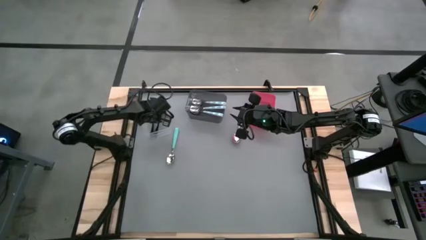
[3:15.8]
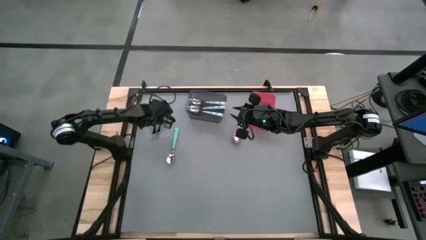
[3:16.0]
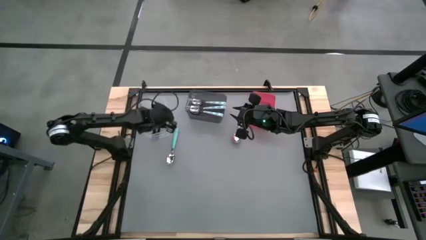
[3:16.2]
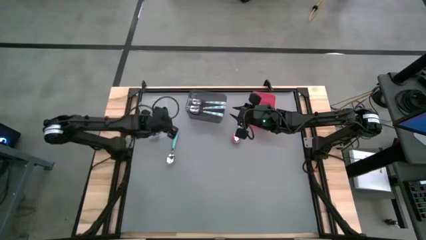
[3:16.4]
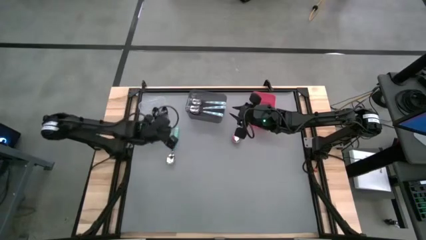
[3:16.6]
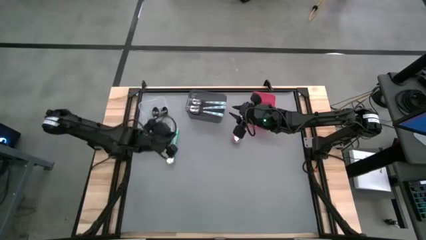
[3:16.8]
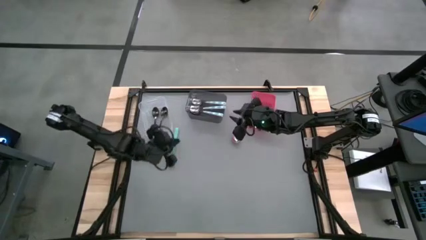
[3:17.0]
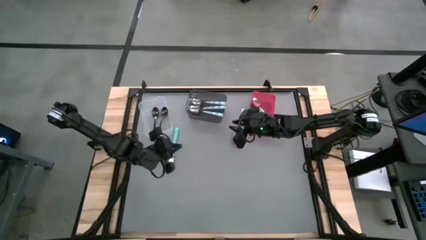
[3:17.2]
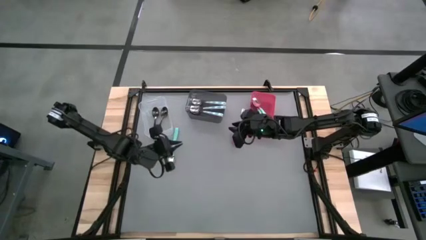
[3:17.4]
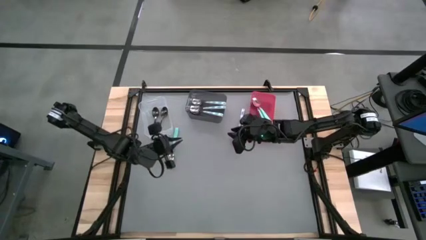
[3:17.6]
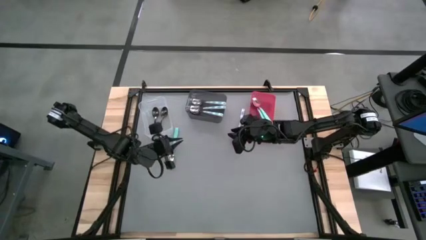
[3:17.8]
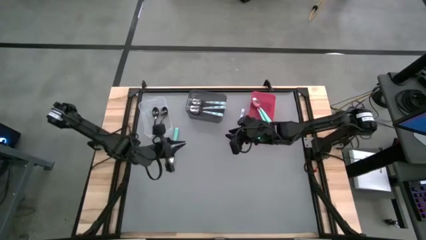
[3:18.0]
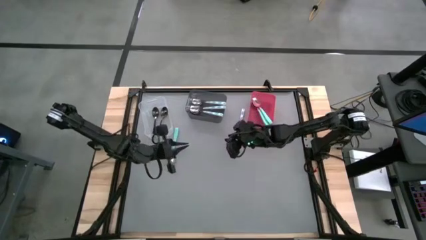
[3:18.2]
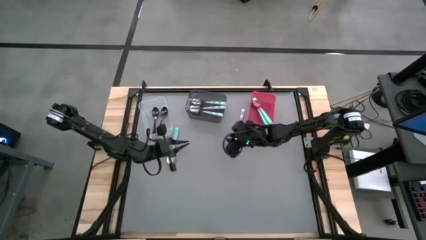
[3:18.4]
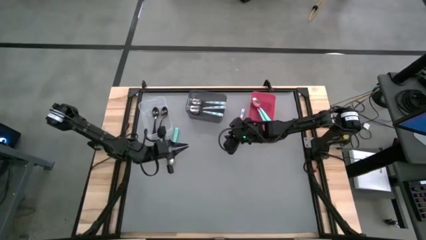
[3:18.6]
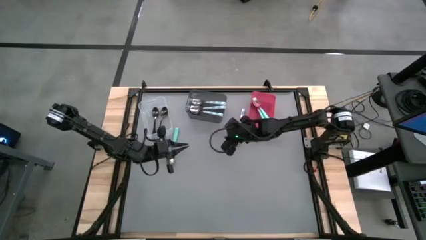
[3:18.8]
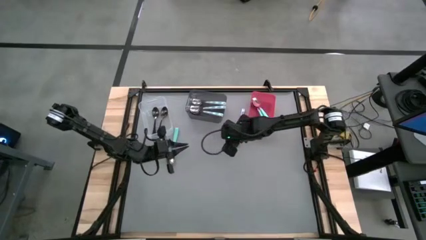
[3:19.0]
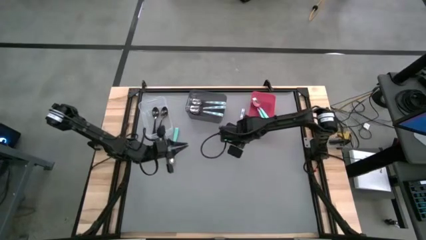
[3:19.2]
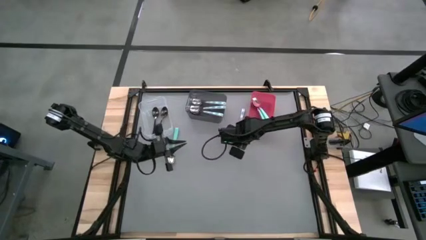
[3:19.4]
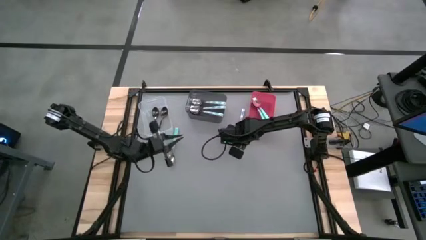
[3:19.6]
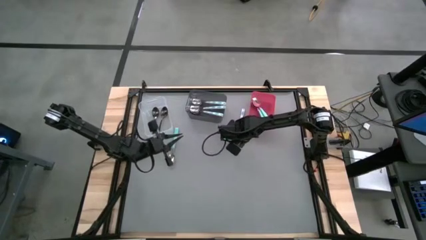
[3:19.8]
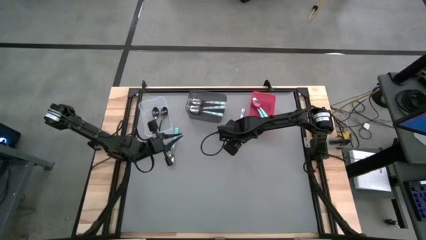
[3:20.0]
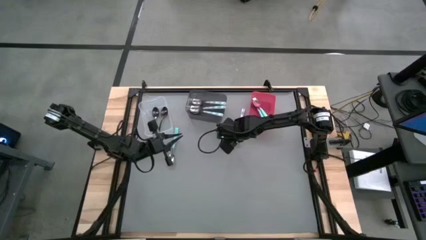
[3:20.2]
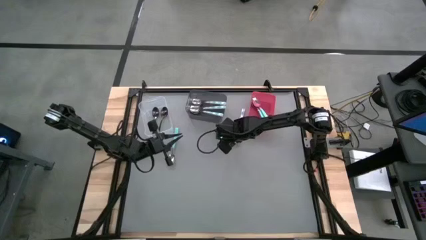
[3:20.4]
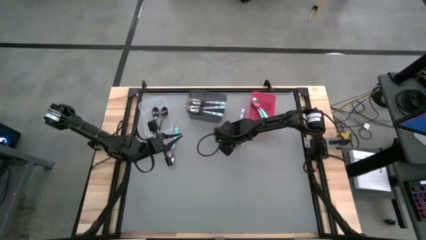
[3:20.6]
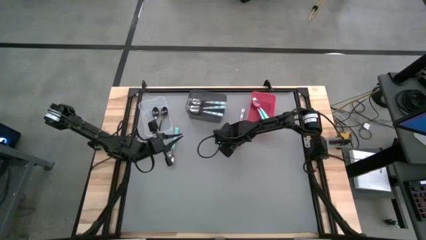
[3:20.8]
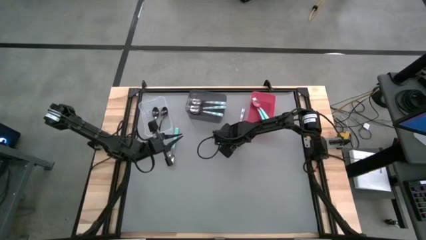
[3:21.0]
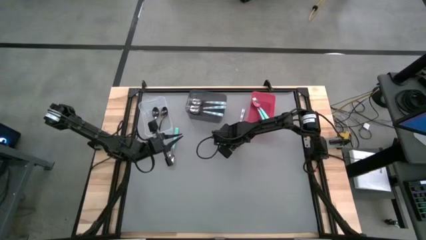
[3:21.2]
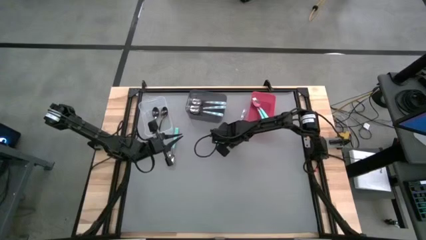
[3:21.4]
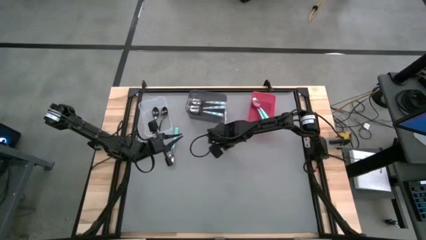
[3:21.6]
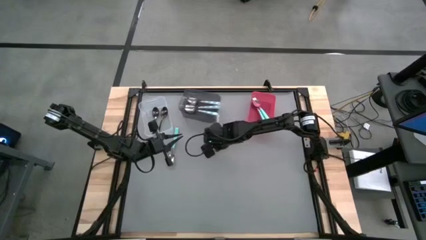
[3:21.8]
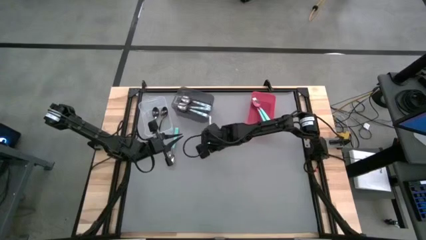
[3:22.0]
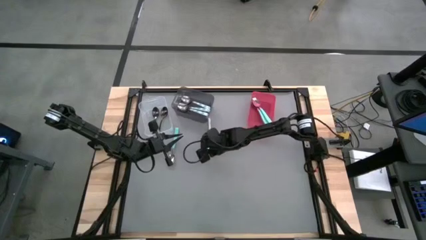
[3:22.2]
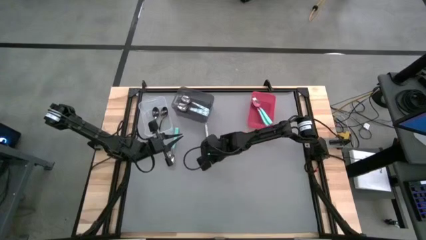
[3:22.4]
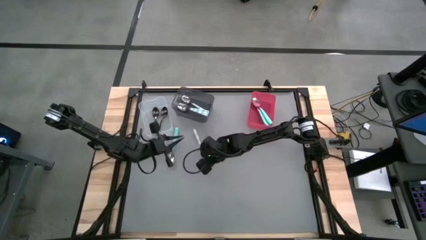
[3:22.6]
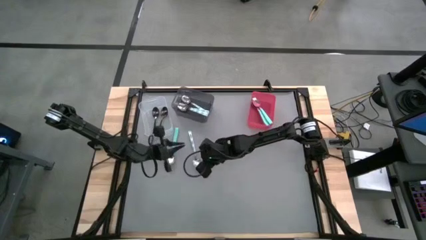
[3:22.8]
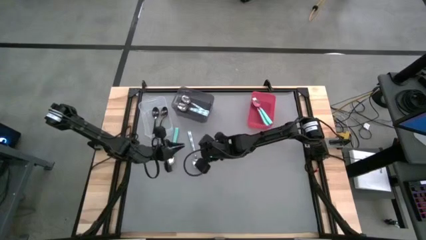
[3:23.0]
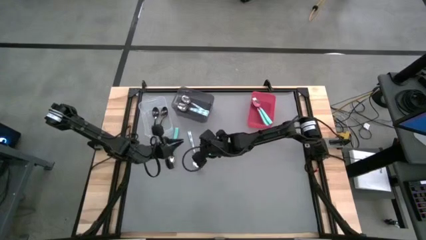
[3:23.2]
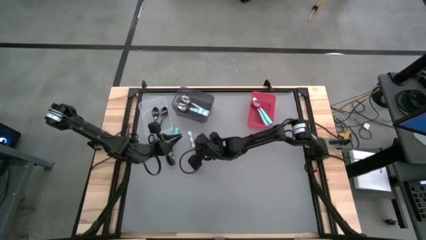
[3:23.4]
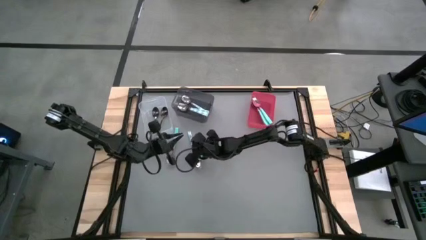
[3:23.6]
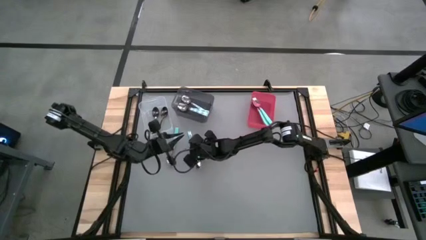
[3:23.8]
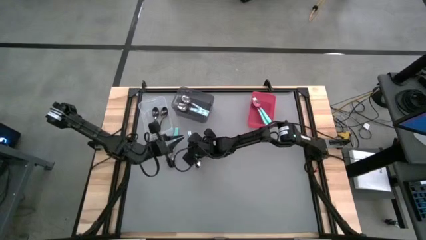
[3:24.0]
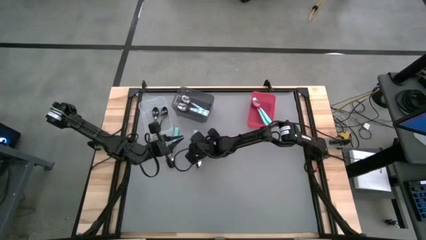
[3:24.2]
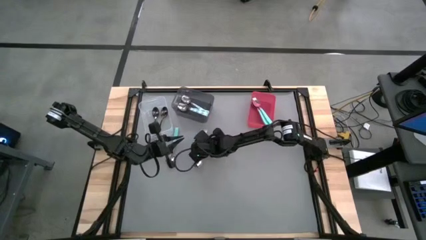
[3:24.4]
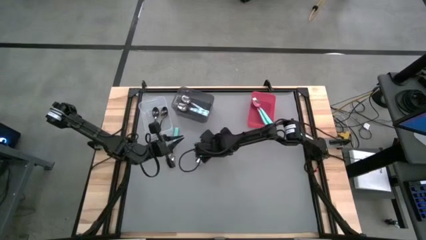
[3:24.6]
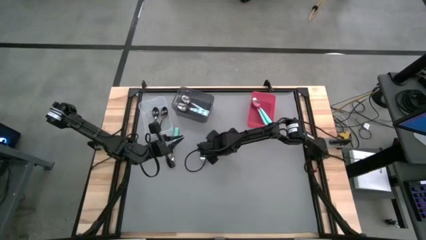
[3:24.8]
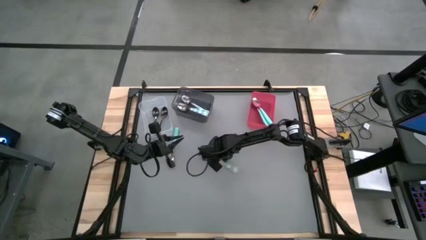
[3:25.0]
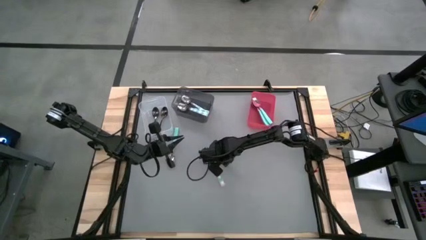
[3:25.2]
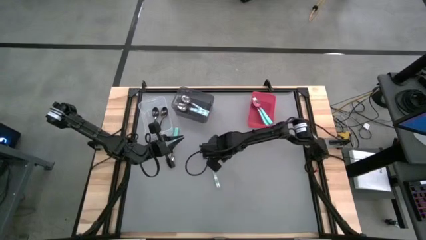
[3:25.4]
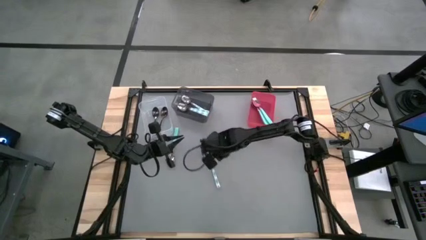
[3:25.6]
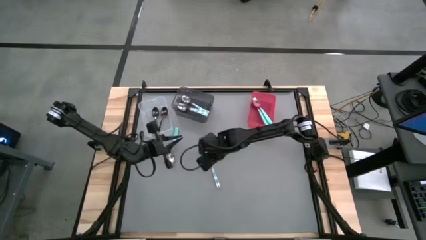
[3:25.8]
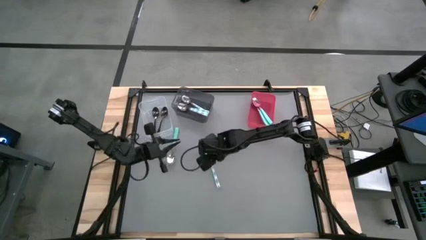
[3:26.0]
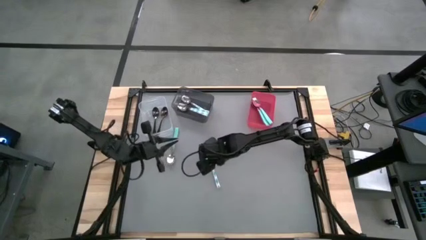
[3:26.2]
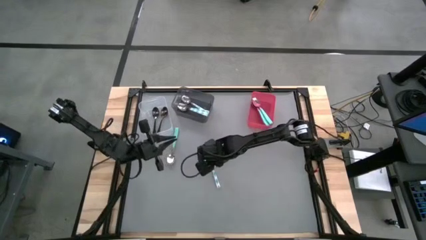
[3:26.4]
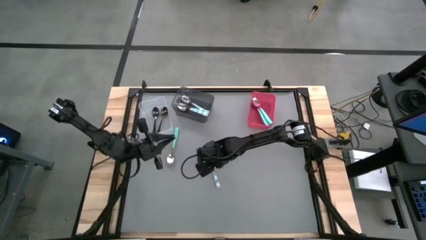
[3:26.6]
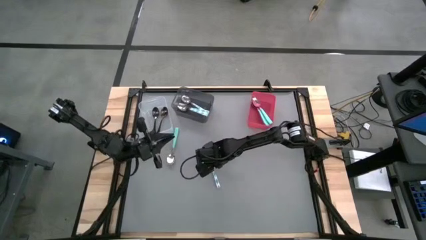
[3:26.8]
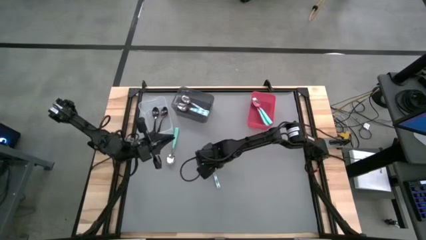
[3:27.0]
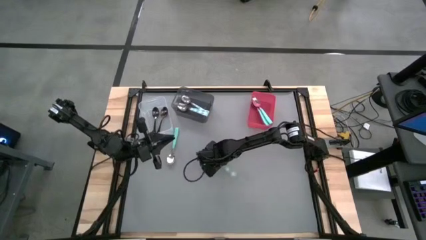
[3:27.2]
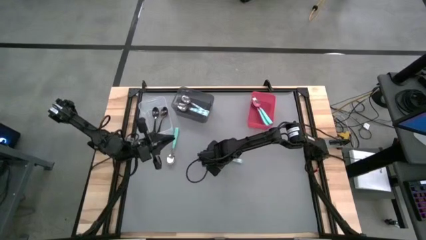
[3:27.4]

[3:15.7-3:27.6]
Task: Sort silverware by color (type)
Put the blue patterned spoon into the black bin

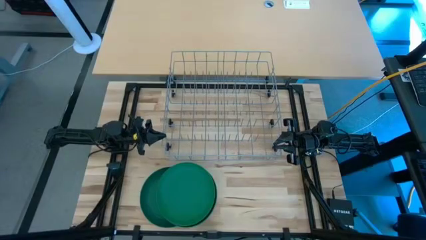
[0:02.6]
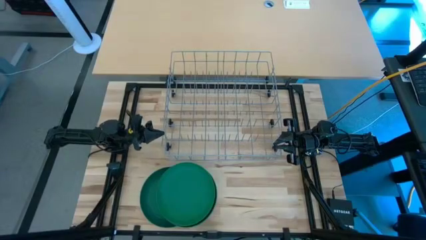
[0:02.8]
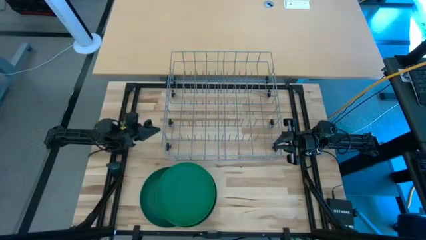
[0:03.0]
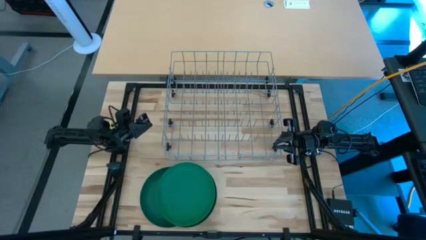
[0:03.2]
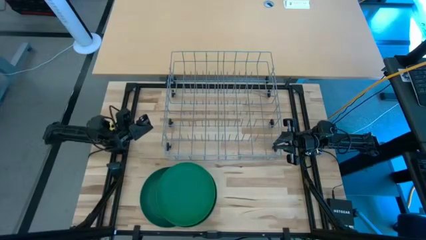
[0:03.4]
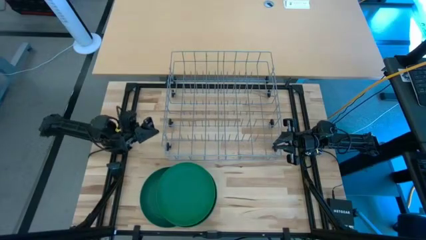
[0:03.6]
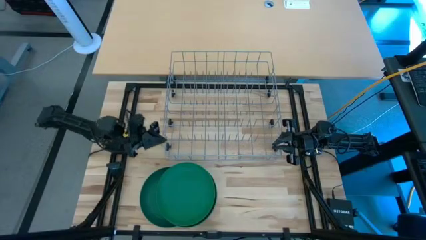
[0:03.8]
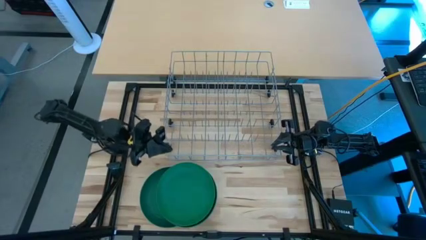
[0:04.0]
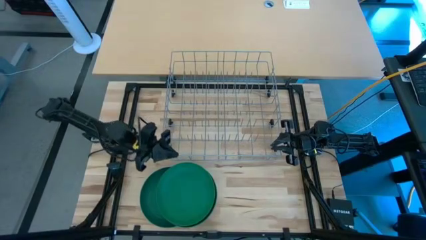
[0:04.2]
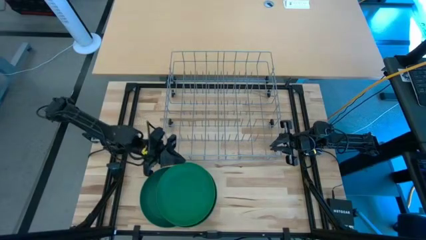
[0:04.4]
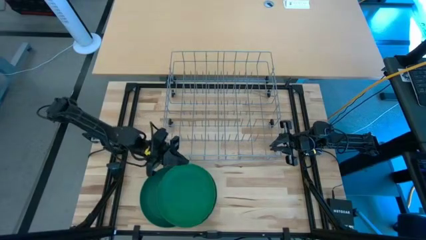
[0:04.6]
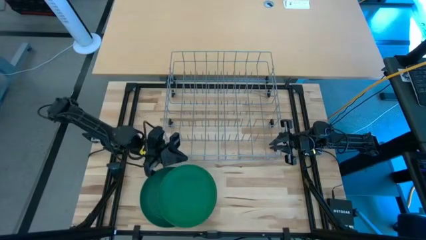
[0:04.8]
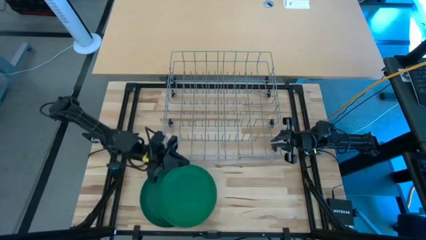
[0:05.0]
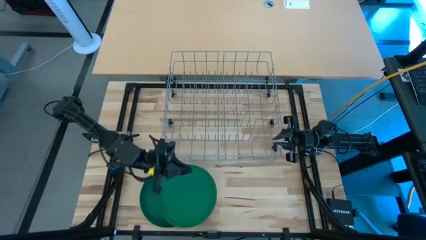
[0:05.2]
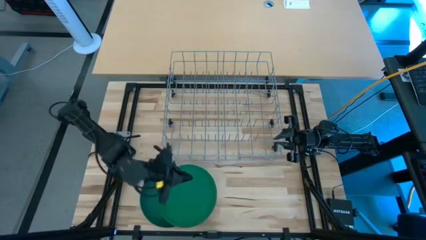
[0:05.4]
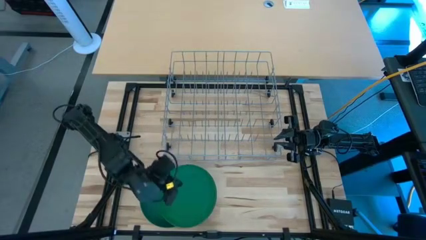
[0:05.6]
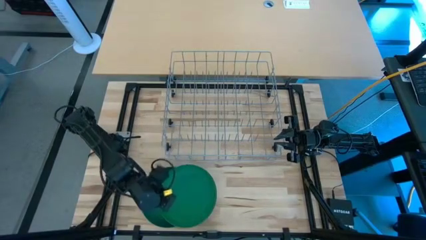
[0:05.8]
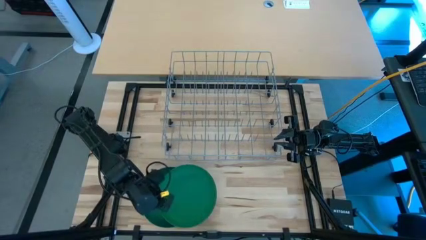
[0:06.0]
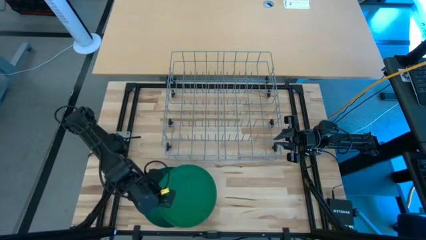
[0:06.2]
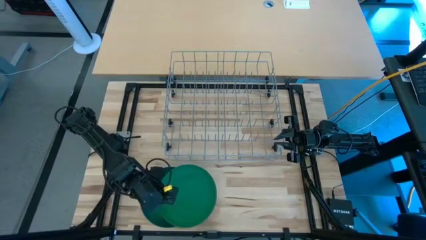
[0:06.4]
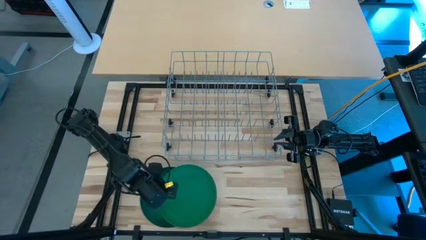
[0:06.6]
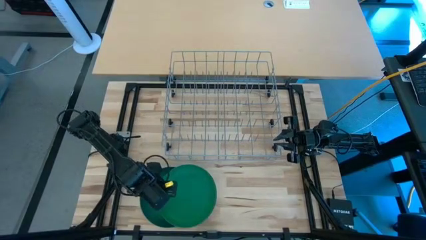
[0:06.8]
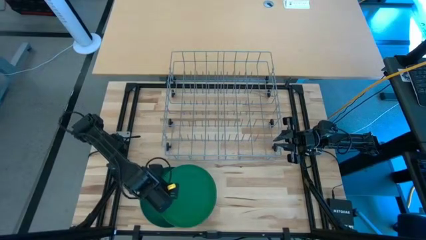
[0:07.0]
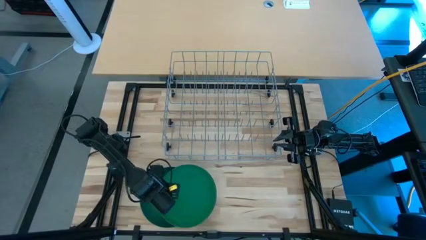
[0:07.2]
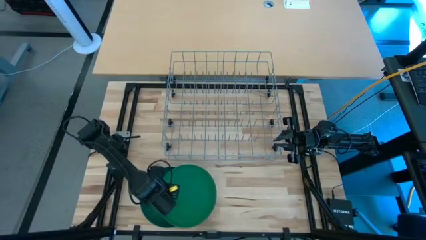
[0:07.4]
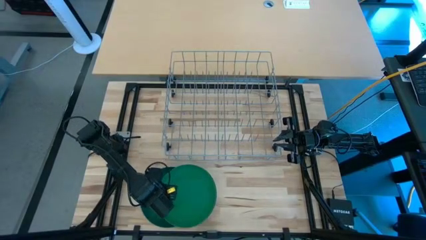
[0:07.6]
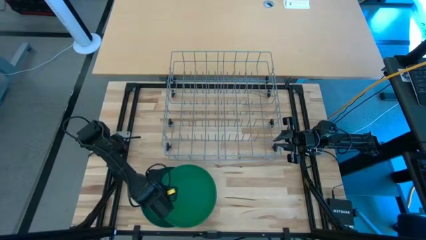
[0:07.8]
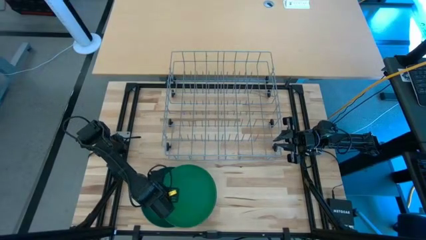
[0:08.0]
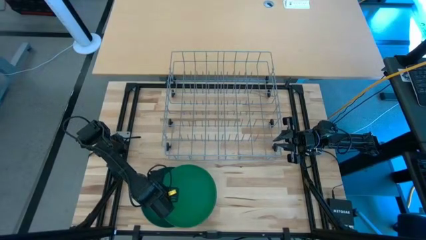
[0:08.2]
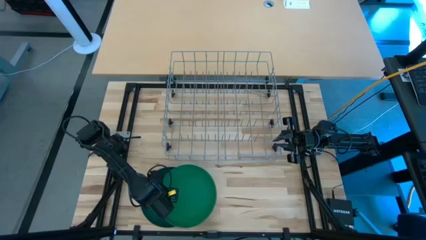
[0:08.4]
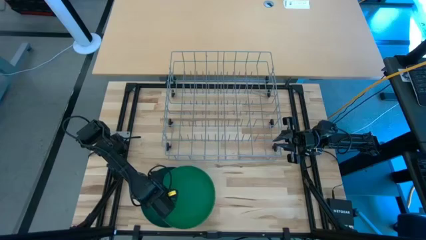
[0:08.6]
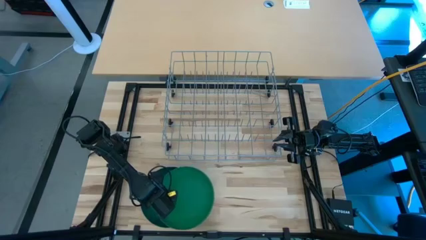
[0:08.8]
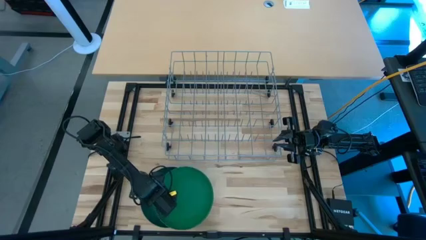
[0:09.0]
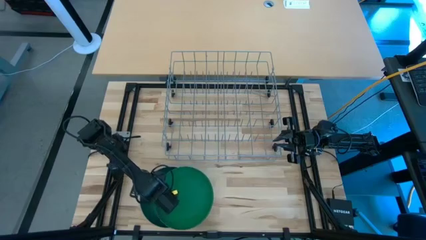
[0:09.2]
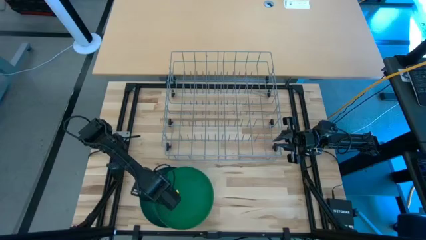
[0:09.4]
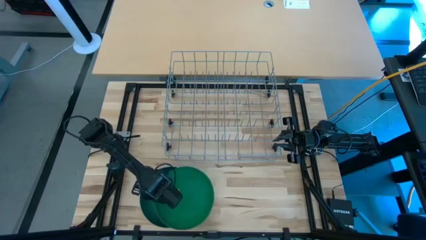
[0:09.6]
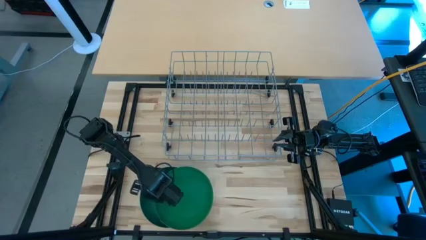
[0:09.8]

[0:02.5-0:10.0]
Task: Sort dishes
Put the top green plate into the dish rack
